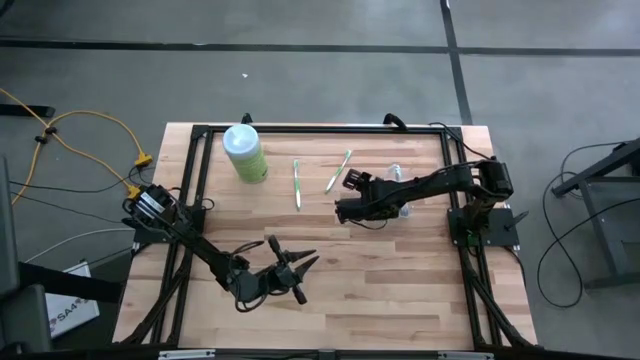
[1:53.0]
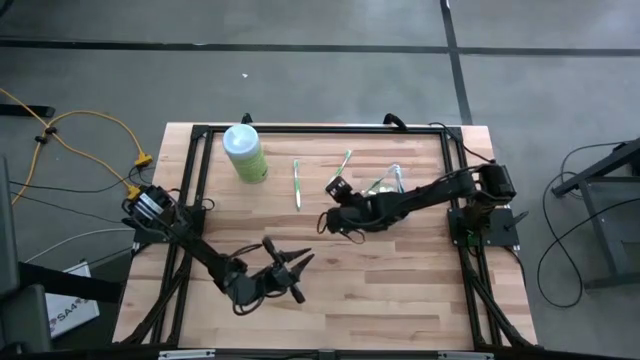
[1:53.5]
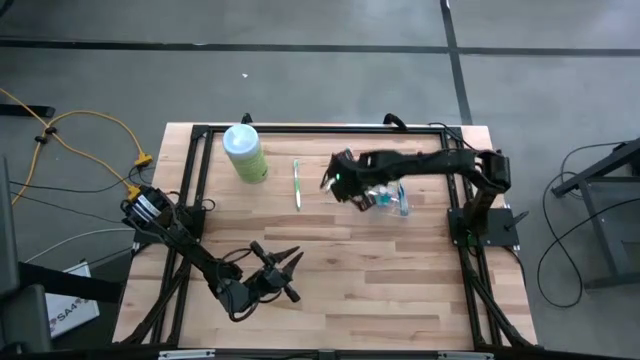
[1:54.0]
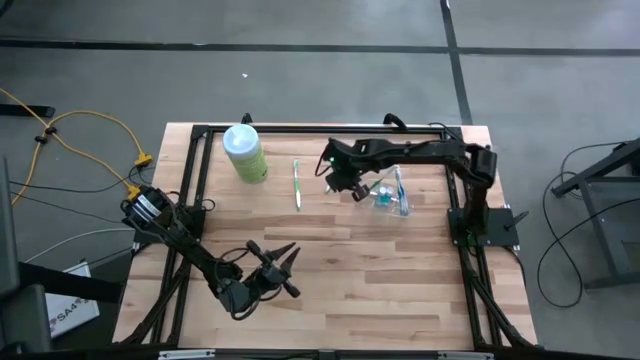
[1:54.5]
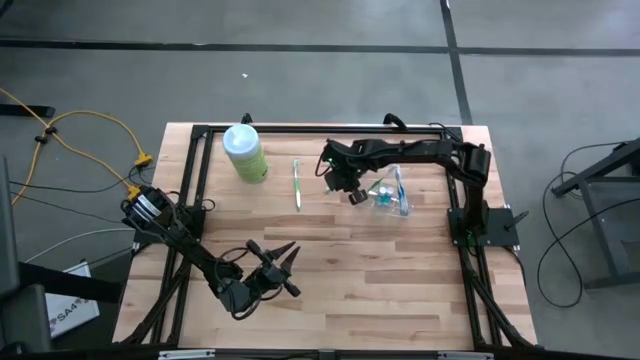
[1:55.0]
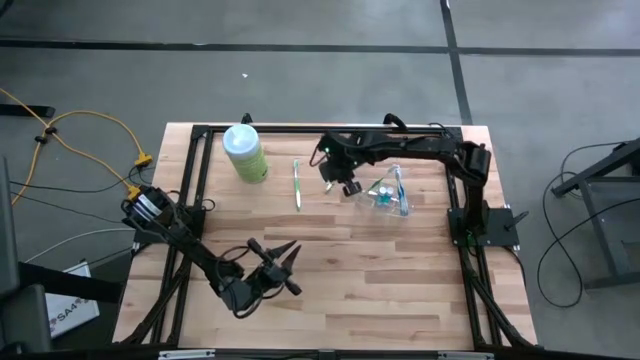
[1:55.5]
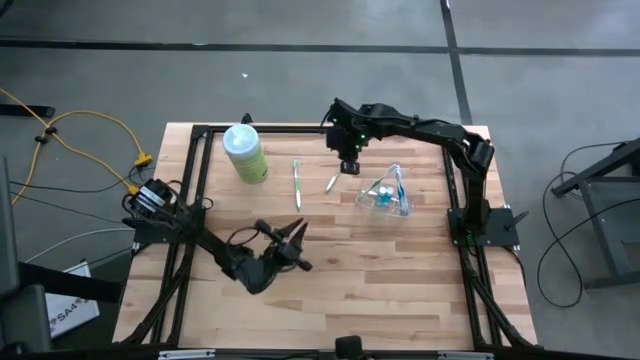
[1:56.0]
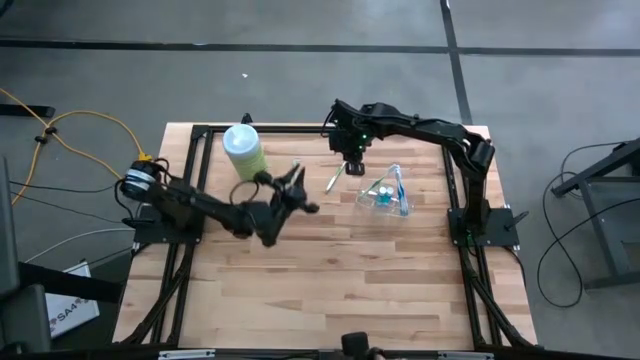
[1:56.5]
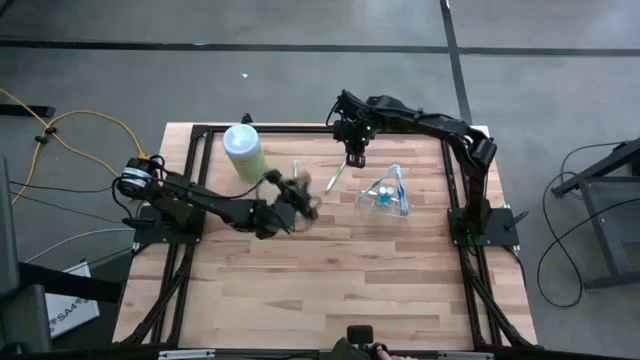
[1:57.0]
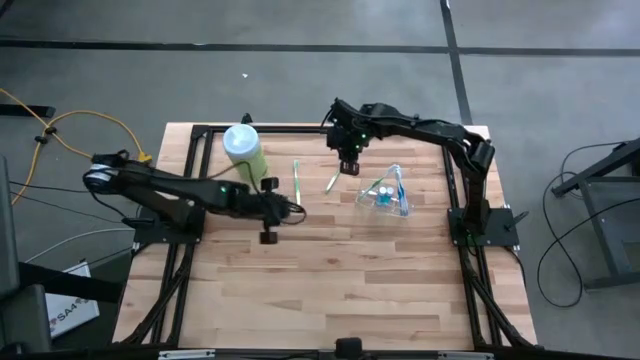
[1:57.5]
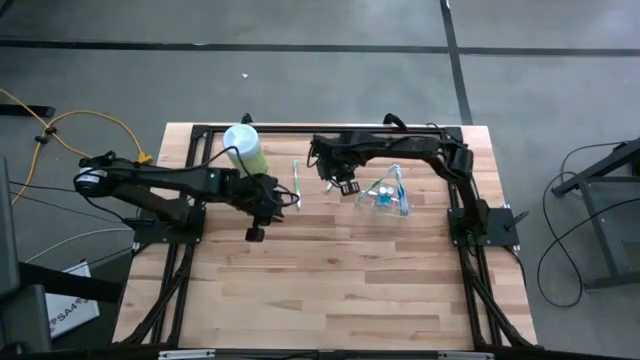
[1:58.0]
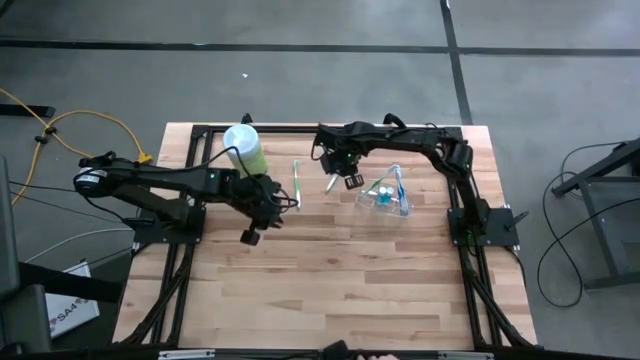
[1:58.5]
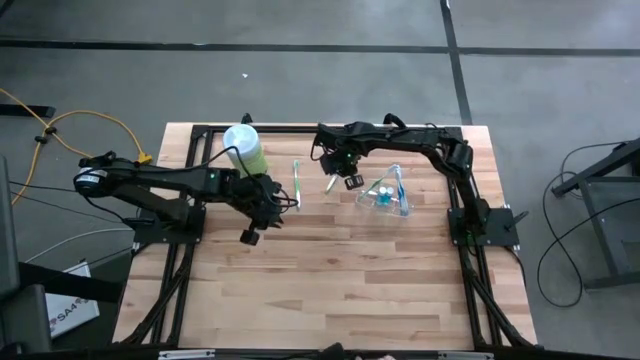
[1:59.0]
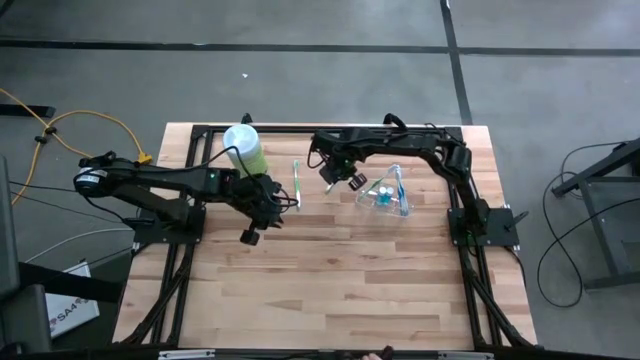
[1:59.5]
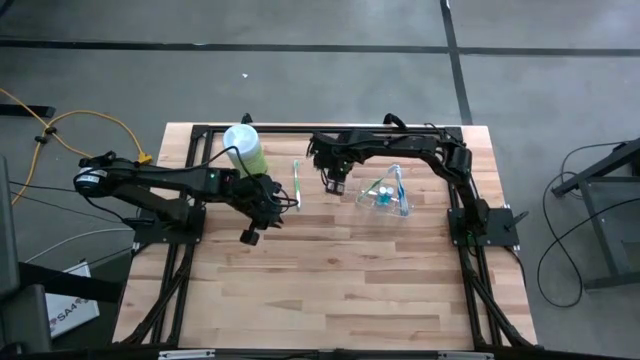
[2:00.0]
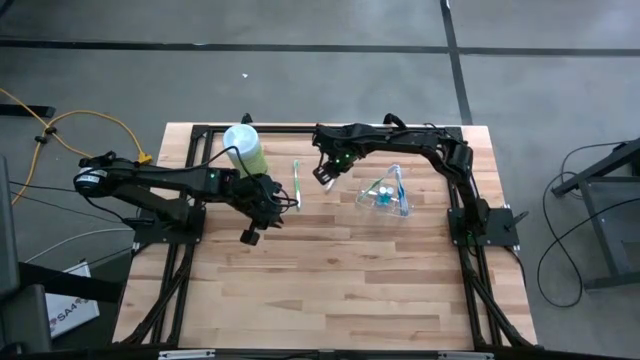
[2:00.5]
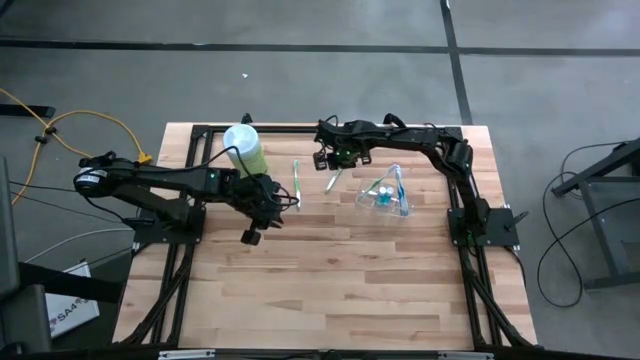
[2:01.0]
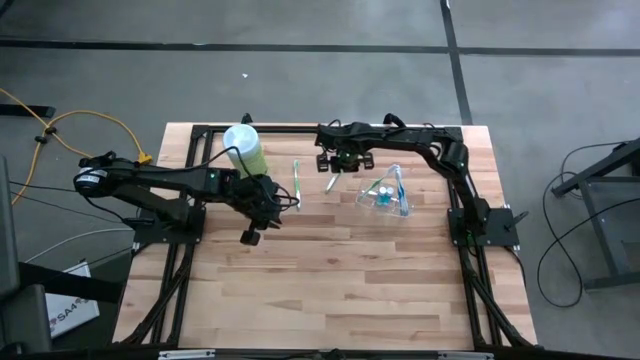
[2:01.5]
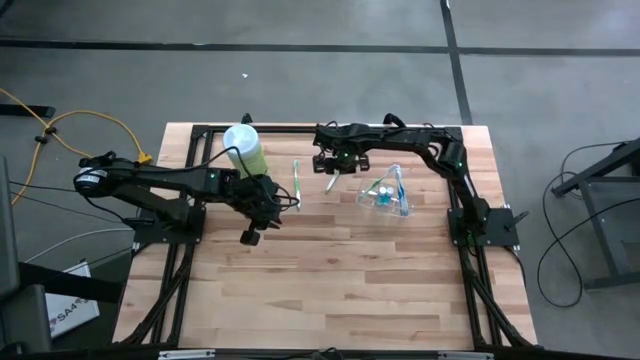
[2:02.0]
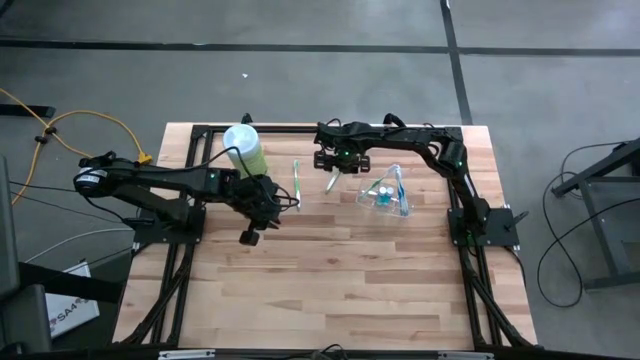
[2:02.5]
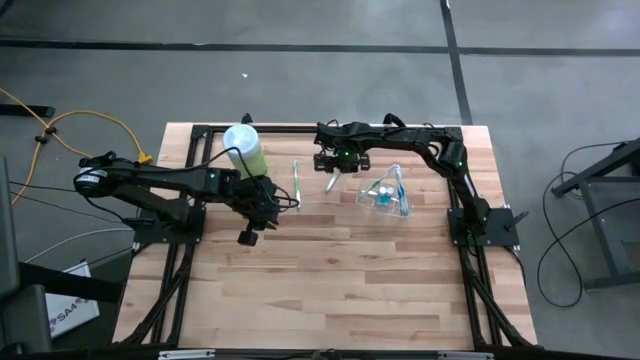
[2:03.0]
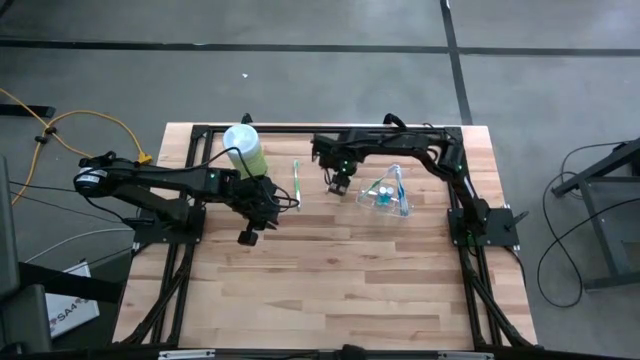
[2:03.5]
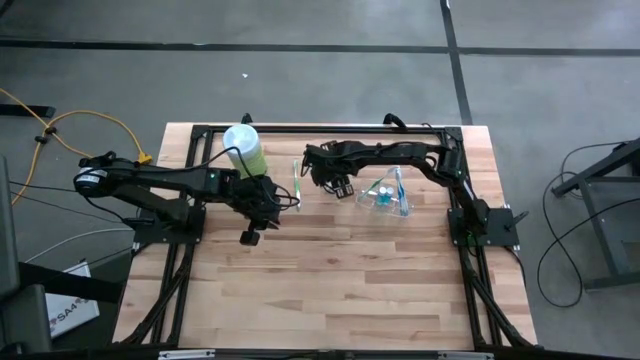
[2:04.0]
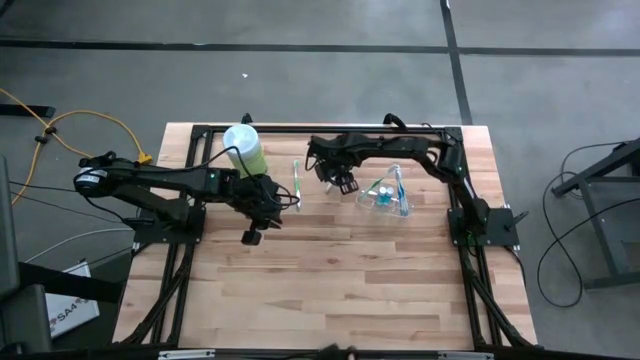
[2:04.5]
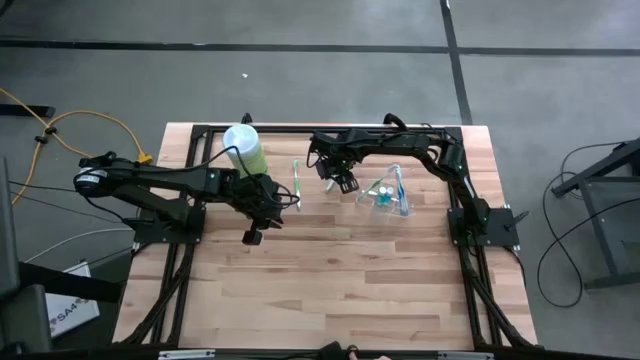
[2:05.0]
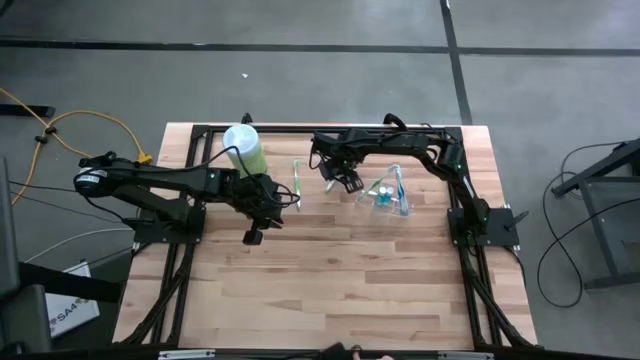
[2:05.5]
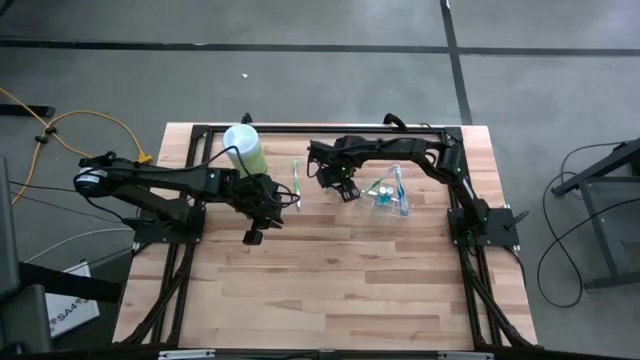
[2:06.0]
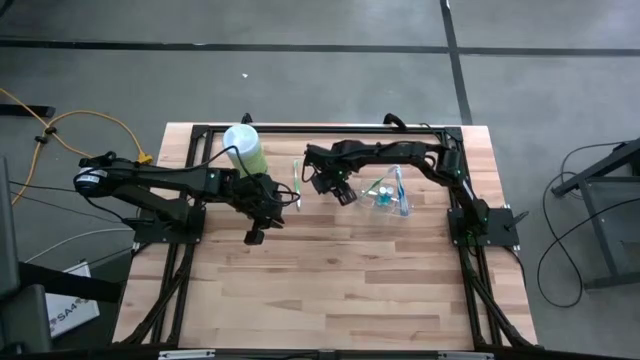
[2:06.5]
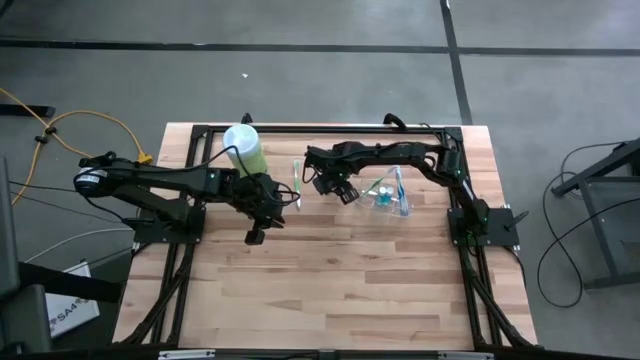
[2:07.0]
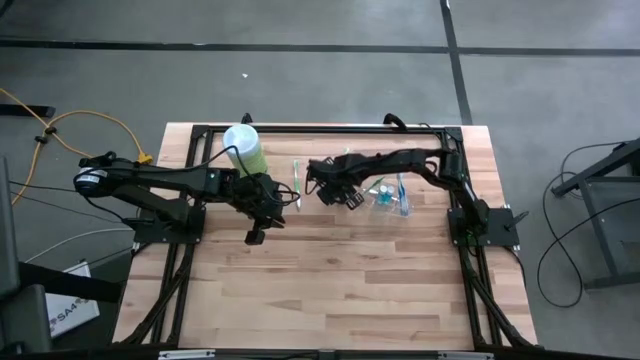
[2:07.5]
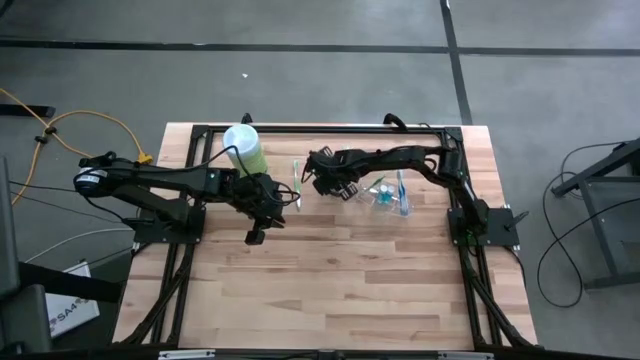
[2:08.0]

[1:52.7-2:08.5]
Task: Pick & Place toothbrushing station
Put the right green toothbrush into the left of the transparent organizer

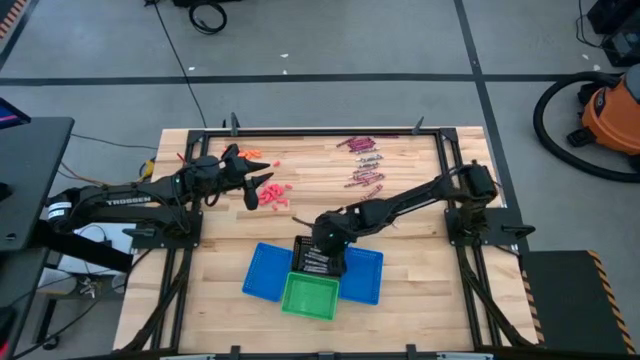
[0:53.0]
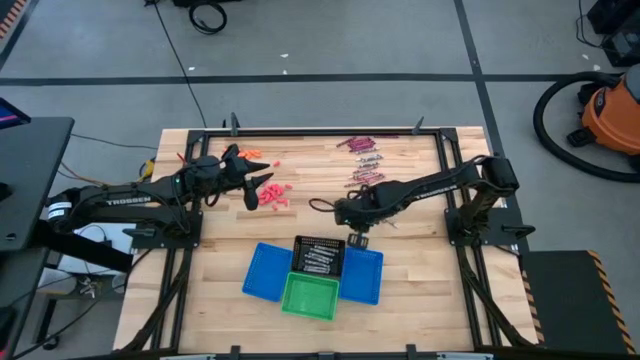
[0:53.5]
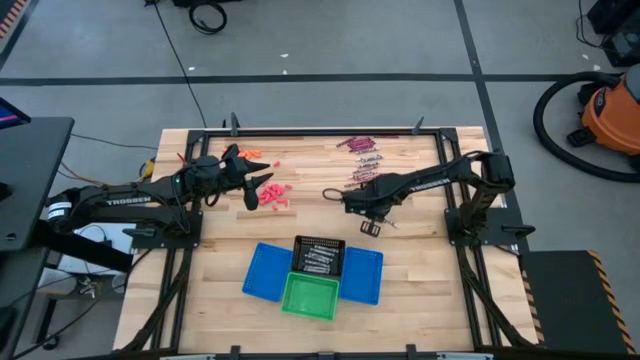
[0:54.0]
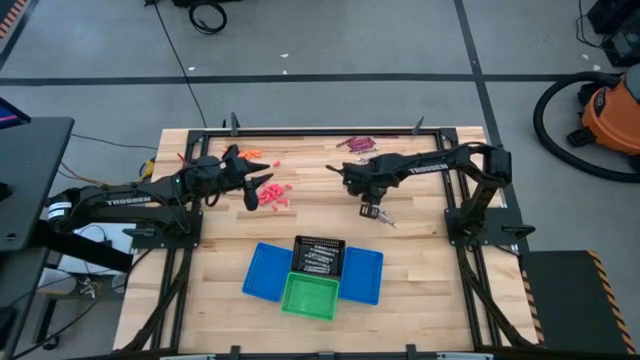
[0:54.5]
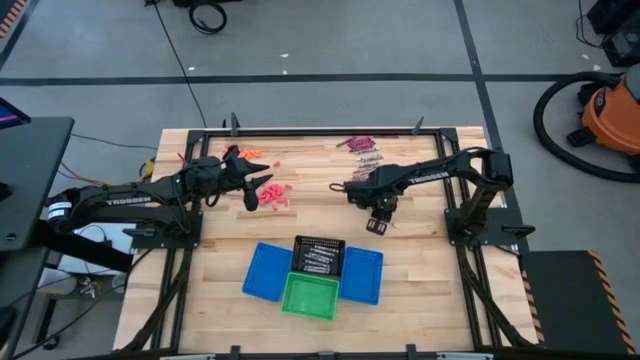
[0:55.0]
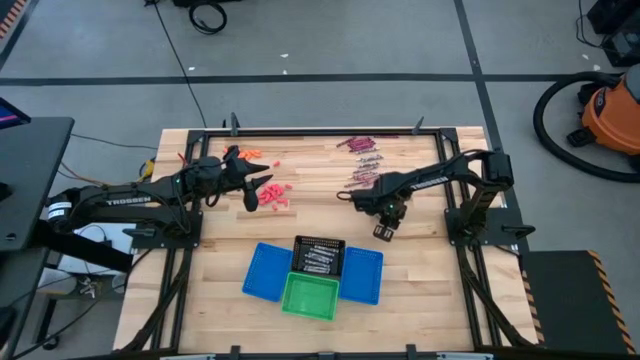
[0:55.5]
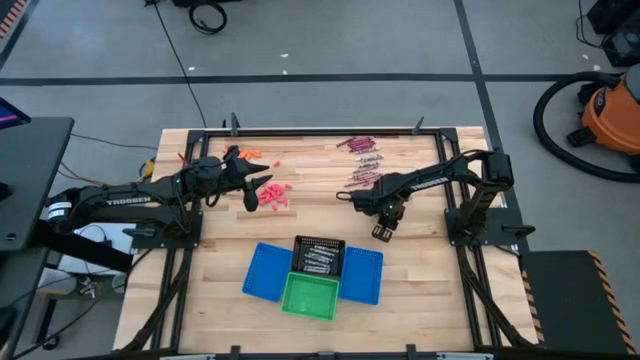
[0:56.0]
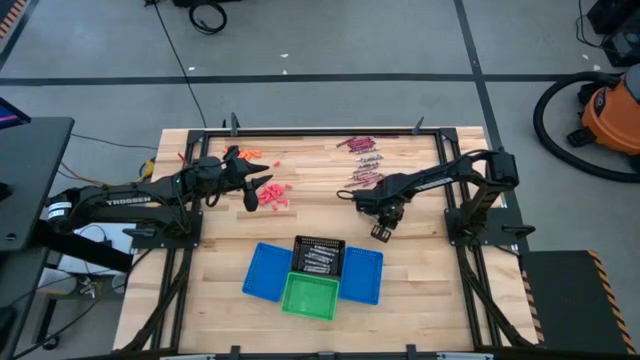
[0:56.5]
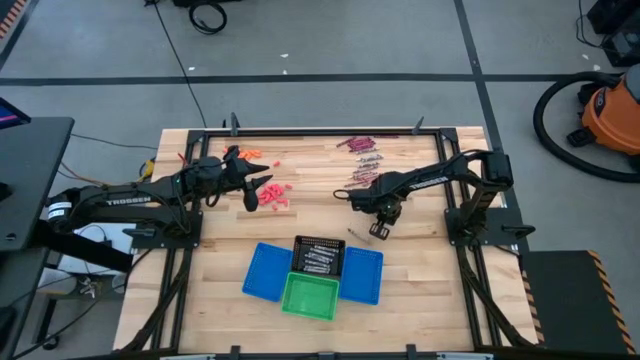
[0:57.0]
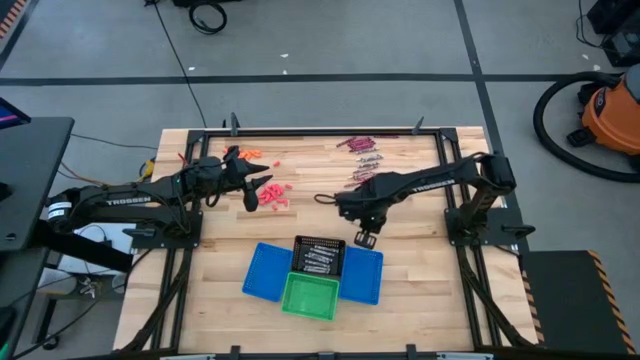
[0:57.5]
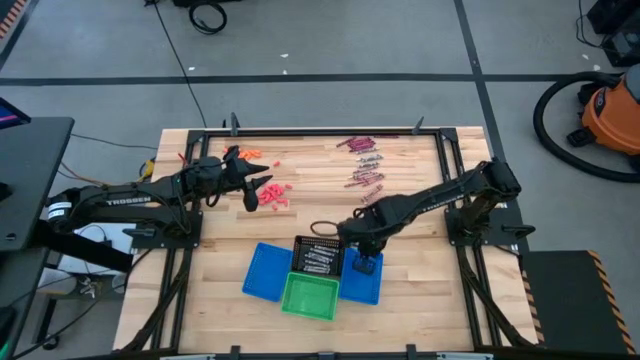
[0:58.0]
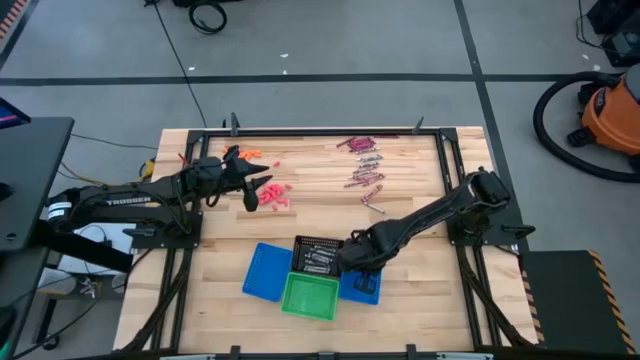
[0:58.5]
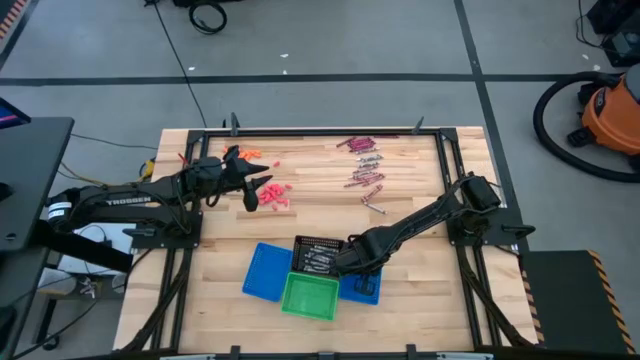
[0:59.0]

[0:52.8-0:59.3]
Task: Sort crayons
Put the white crayon into the right blue bin
